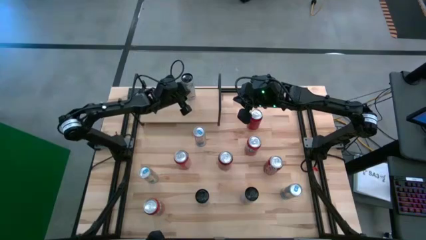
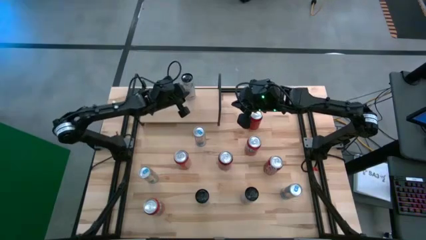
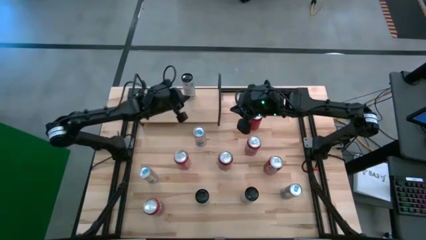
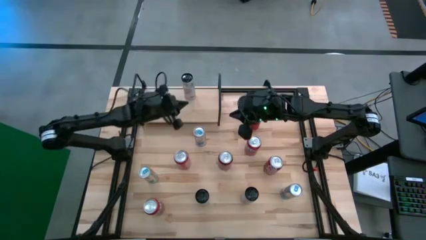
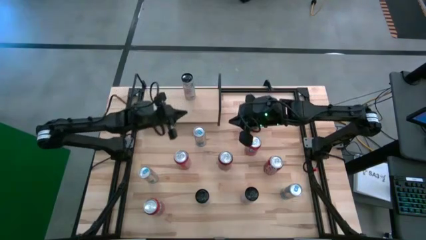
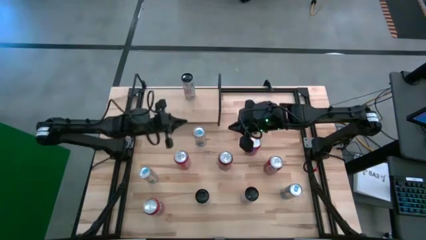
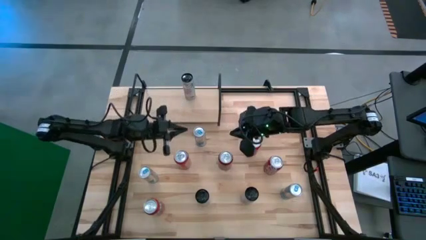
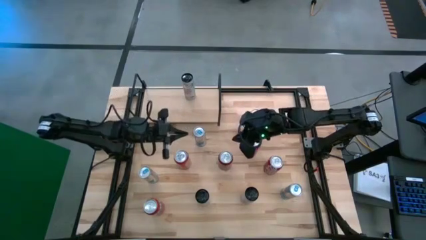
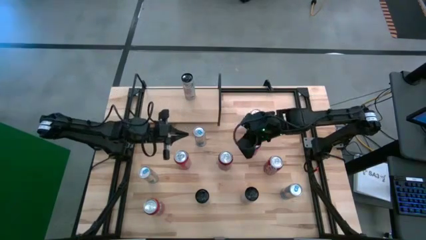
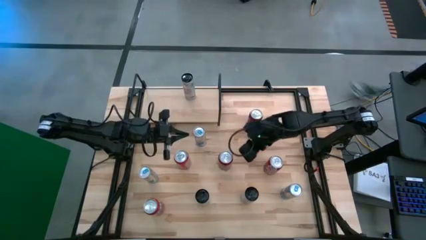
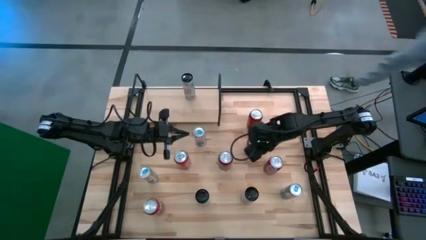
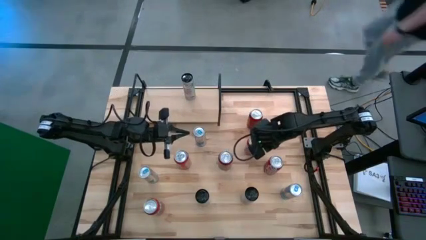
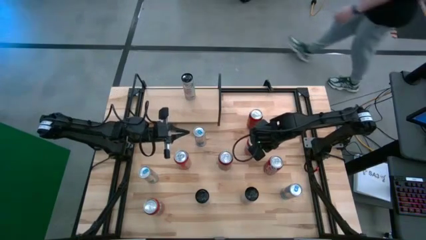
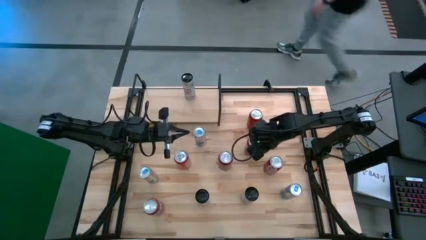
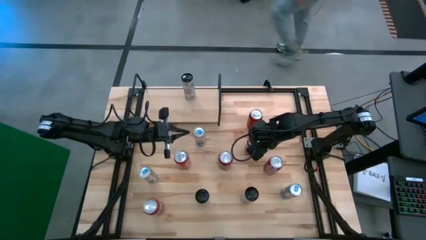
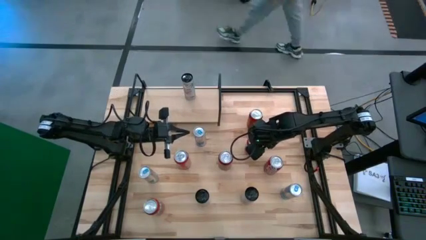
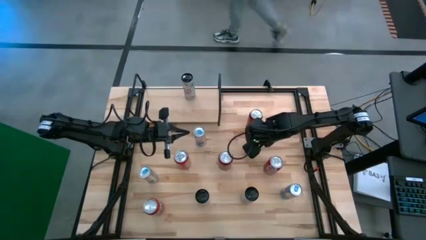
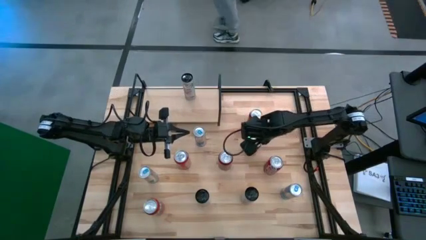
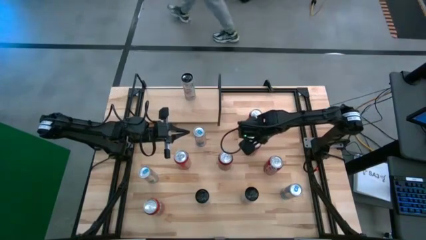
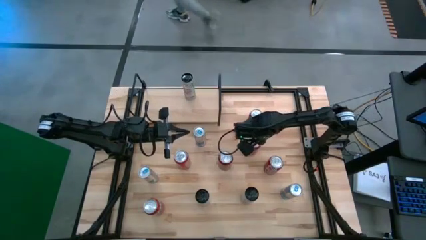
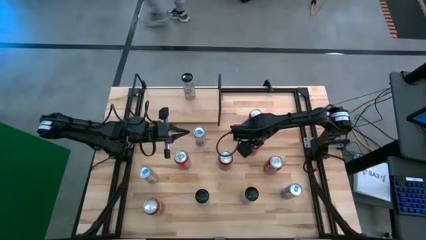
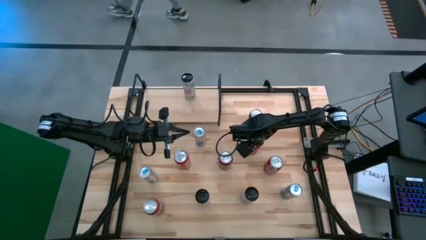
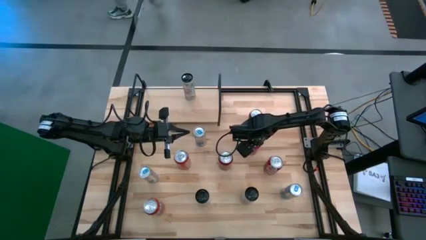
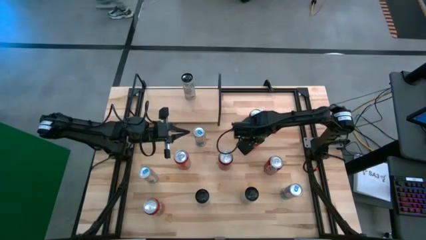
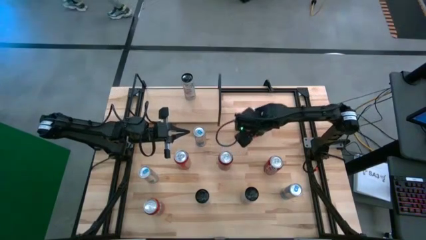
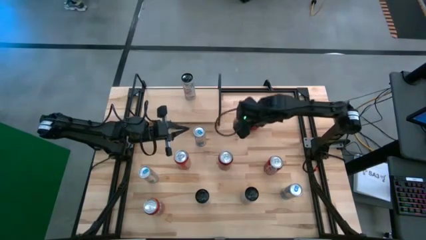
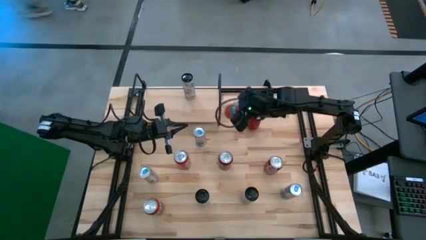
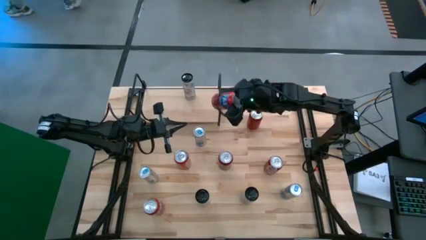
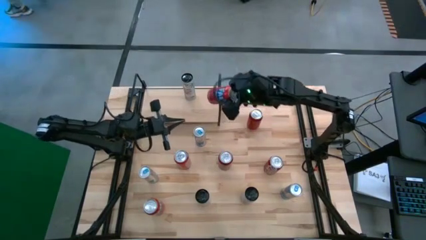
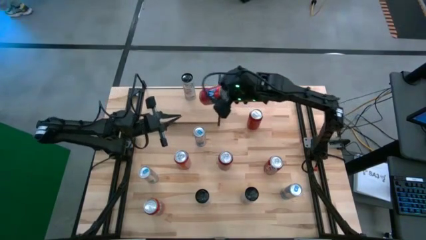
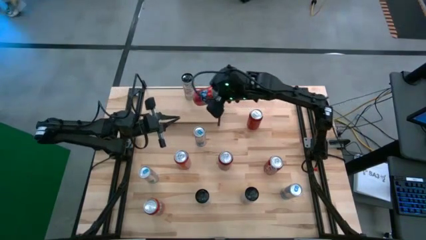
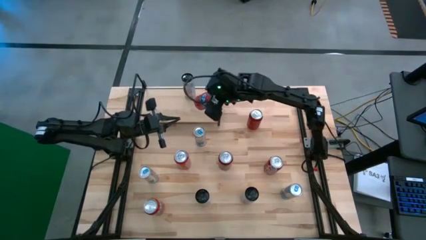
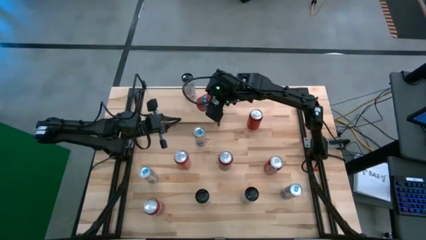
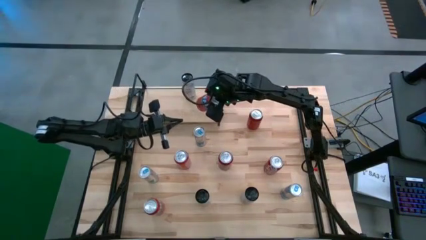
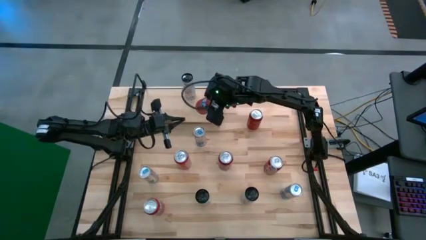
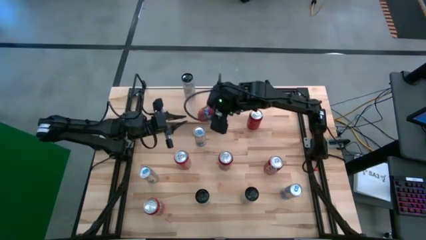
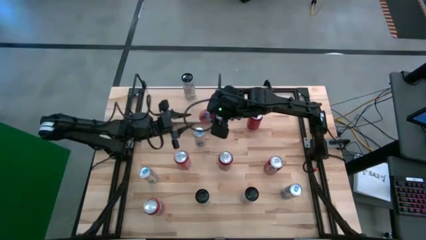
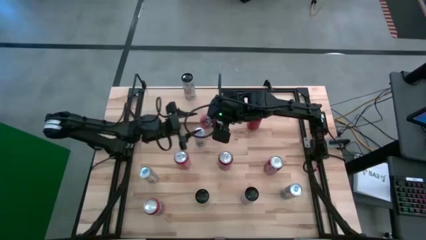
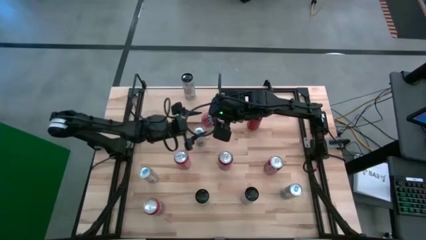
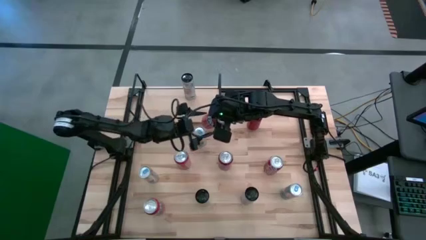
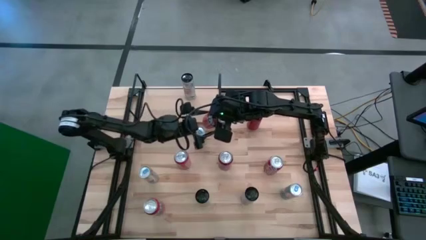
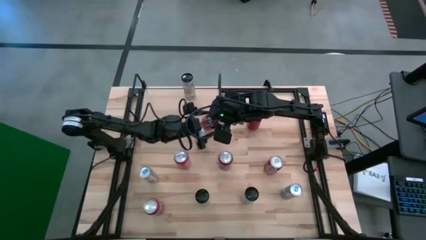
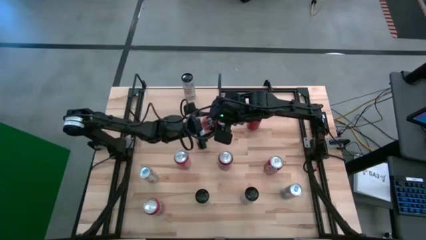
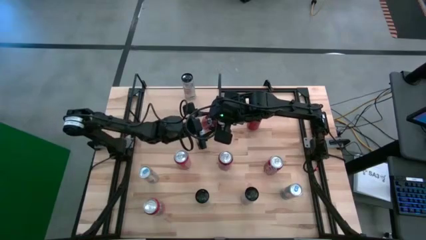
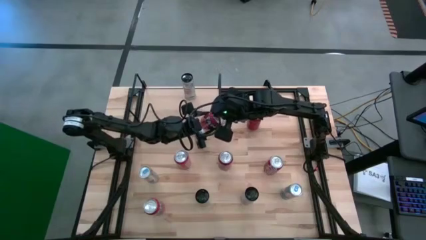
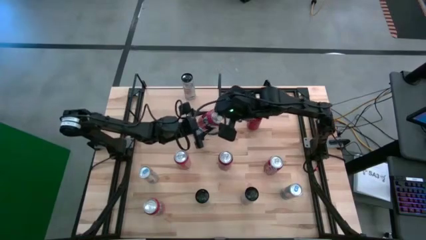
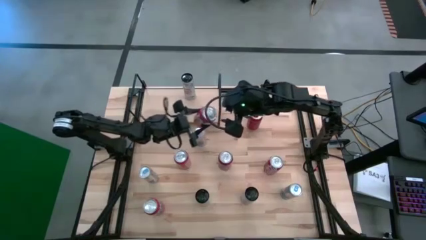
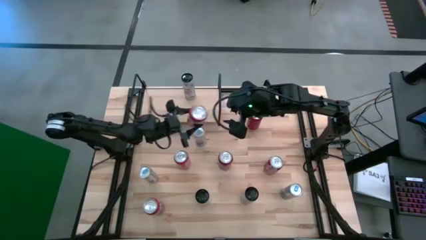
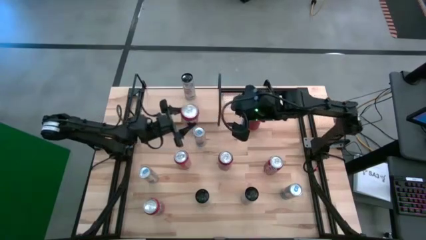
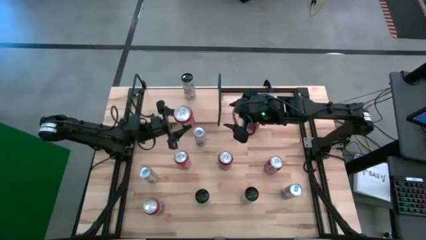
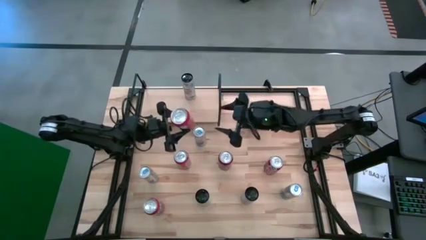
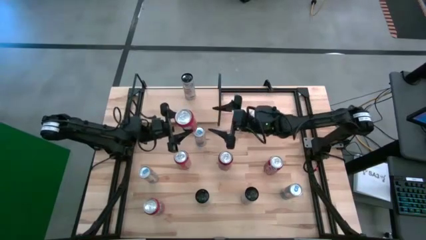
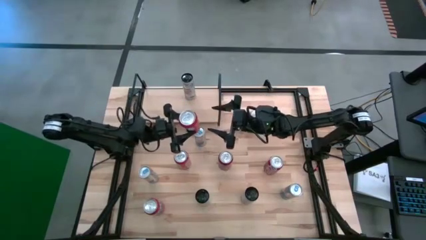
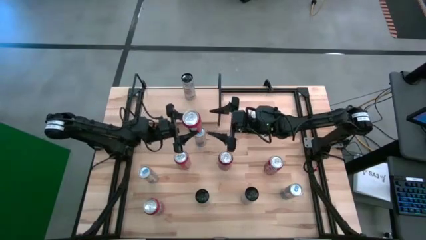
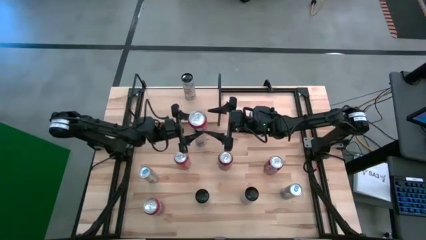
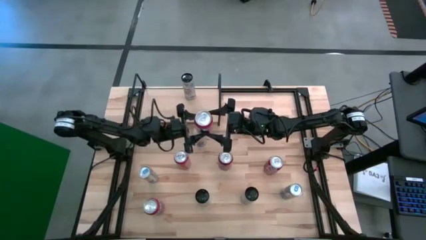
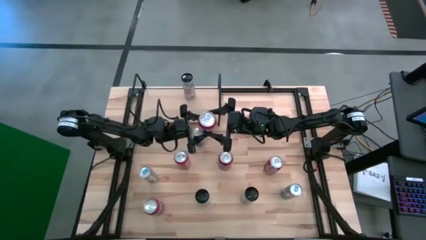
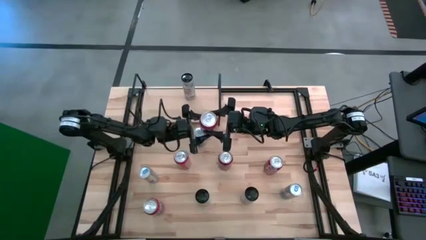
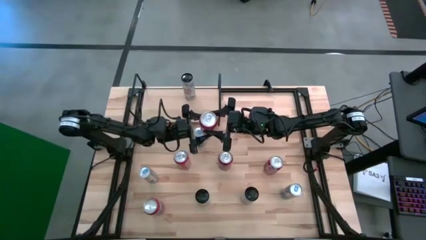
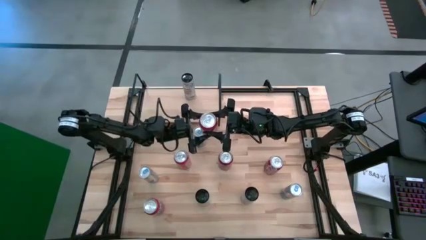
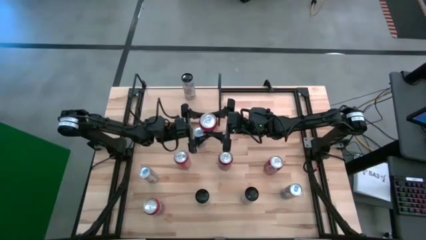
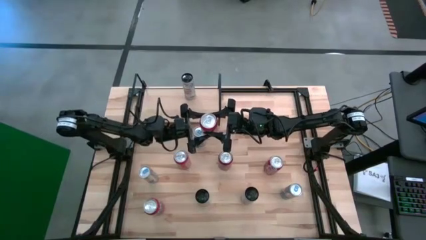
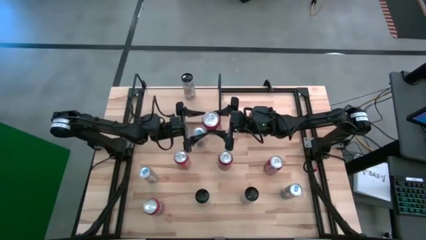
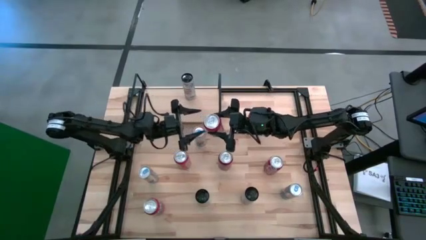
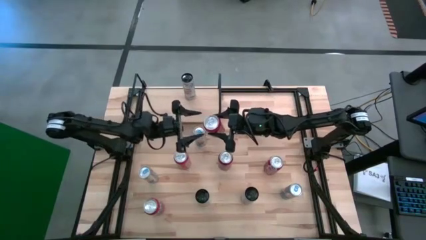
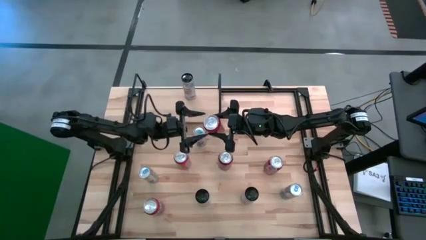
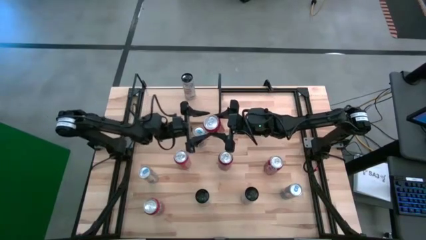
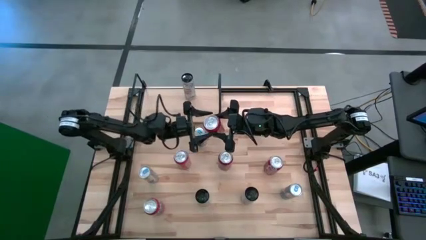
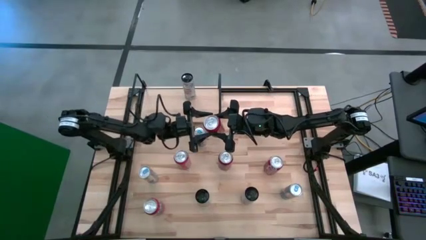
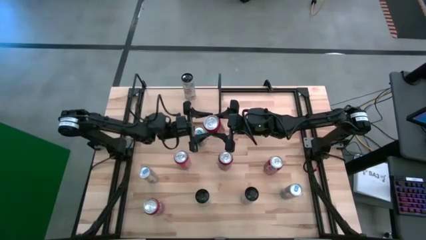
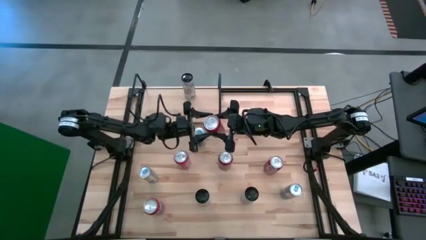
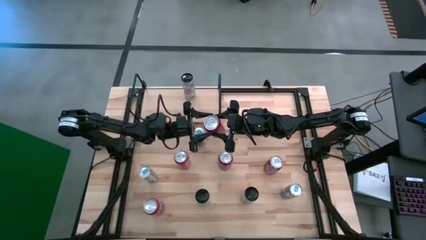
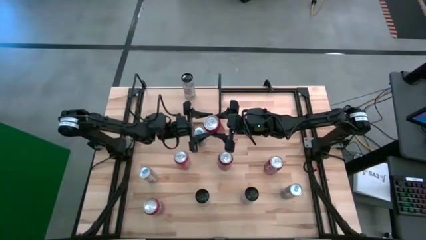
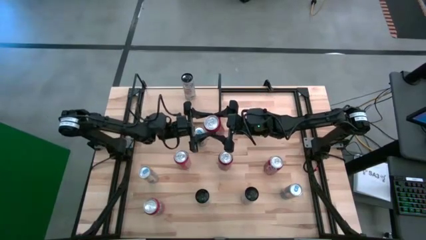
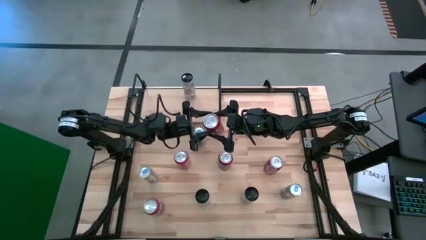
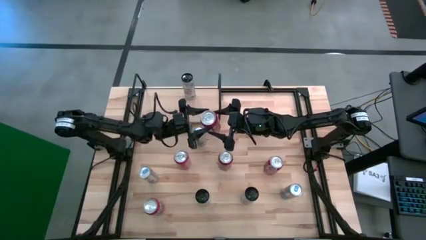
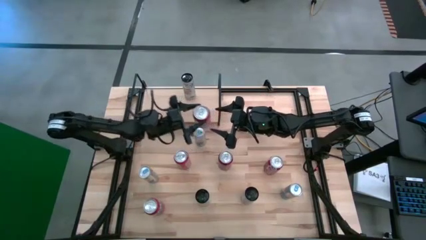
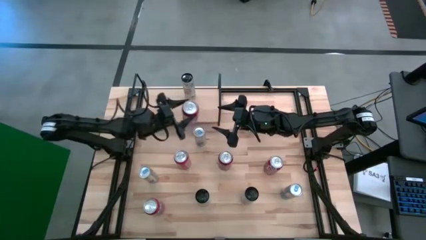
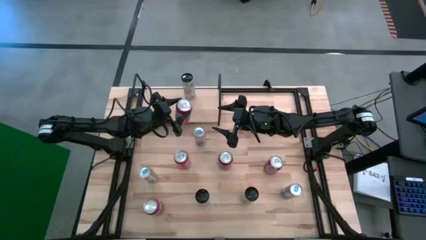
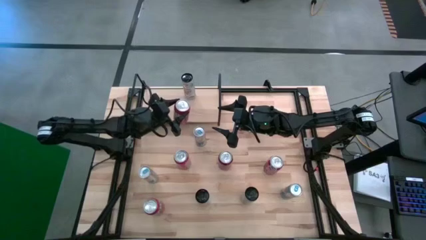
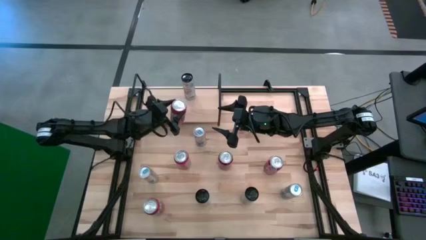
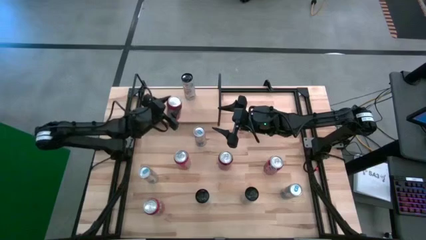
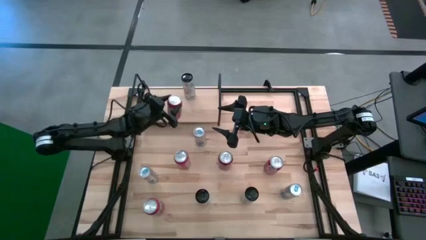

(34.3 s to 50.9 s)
Task: Place canned beverage on shelf
Put the right orange soda can on the shelf
